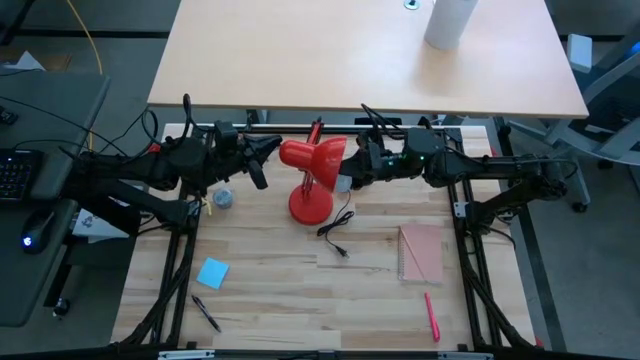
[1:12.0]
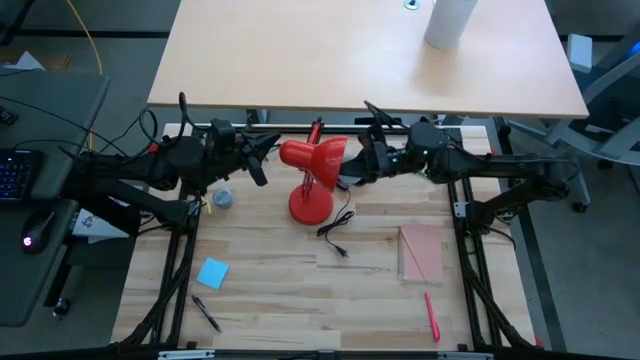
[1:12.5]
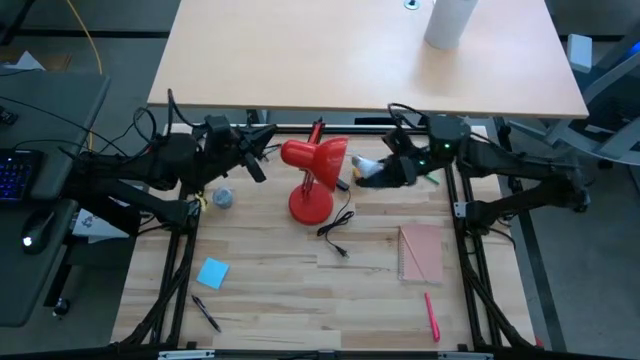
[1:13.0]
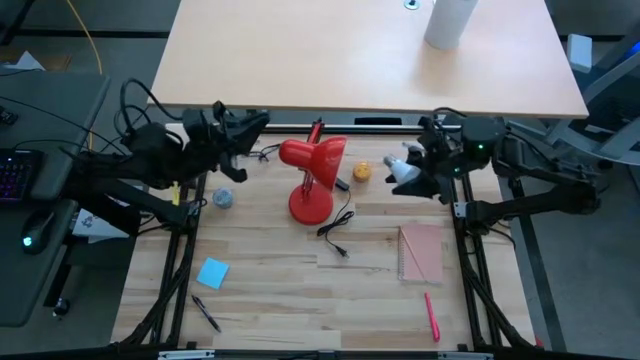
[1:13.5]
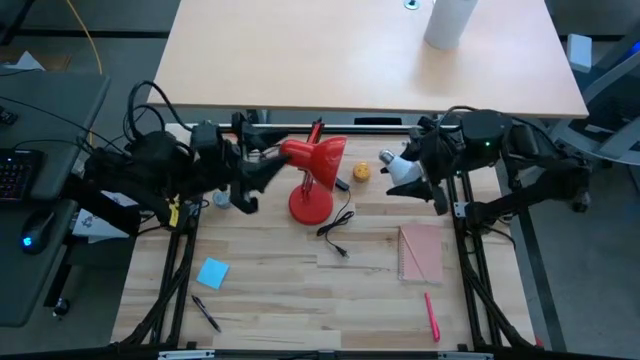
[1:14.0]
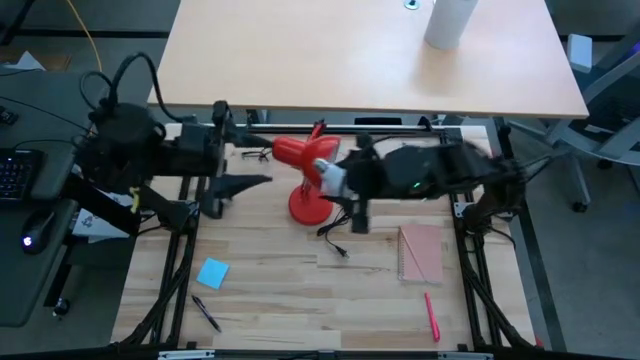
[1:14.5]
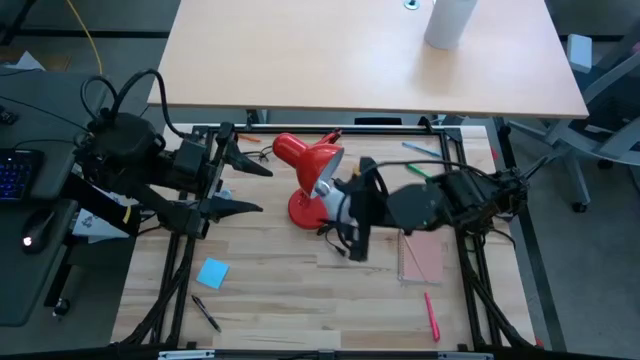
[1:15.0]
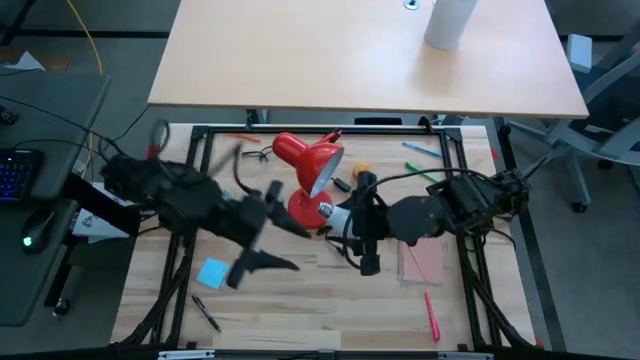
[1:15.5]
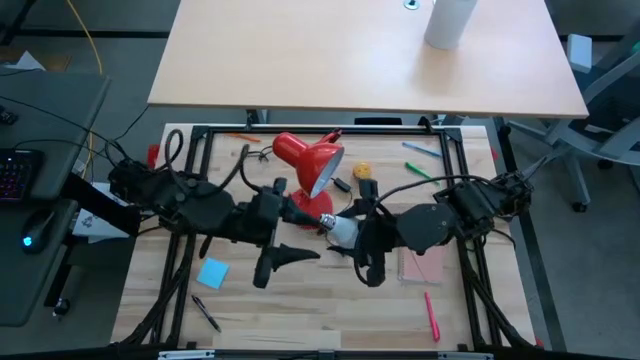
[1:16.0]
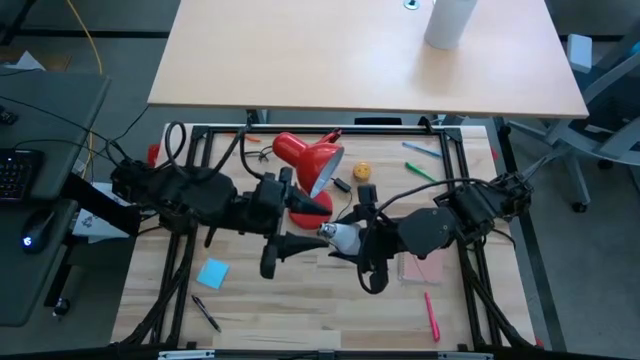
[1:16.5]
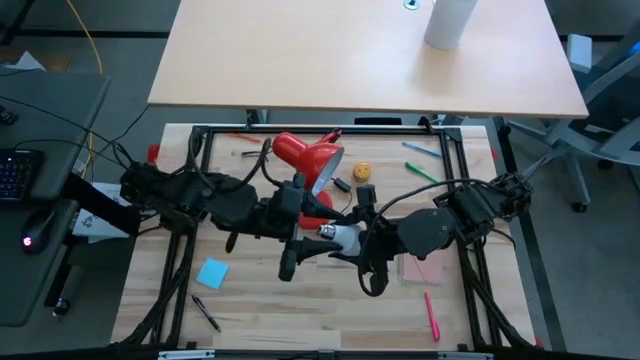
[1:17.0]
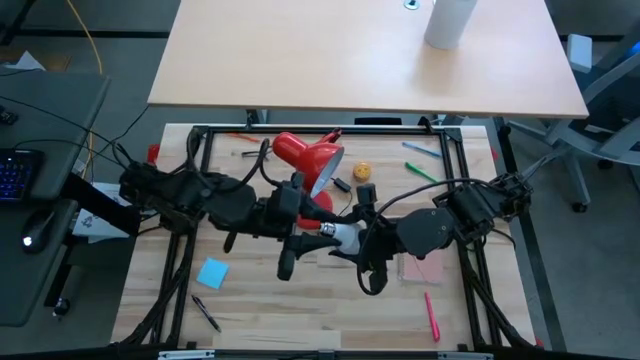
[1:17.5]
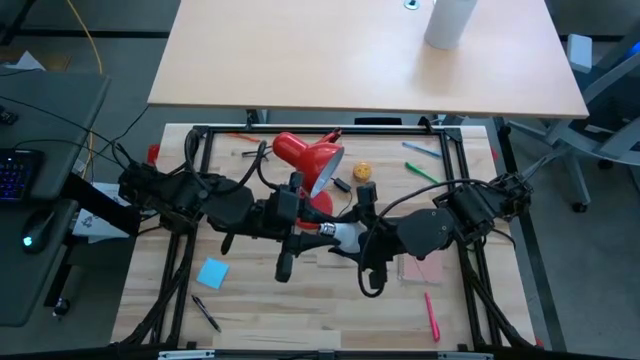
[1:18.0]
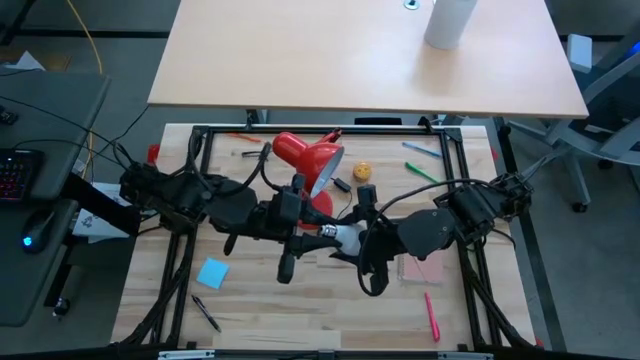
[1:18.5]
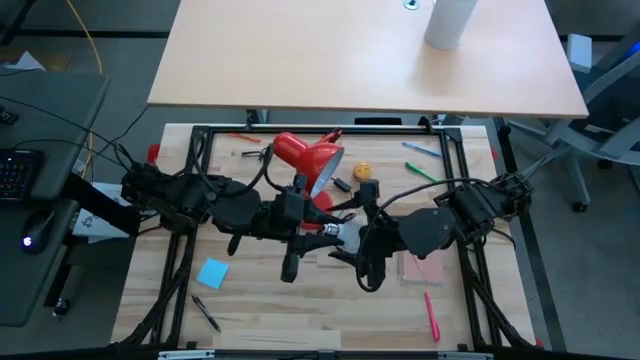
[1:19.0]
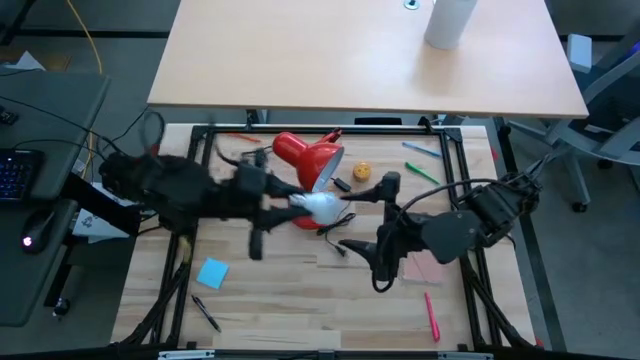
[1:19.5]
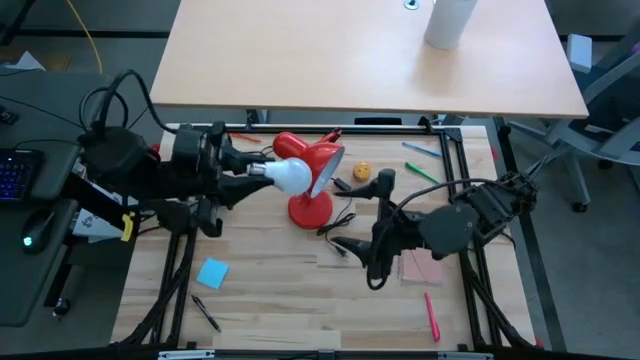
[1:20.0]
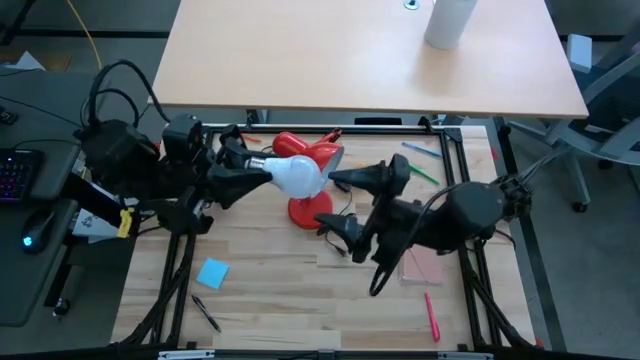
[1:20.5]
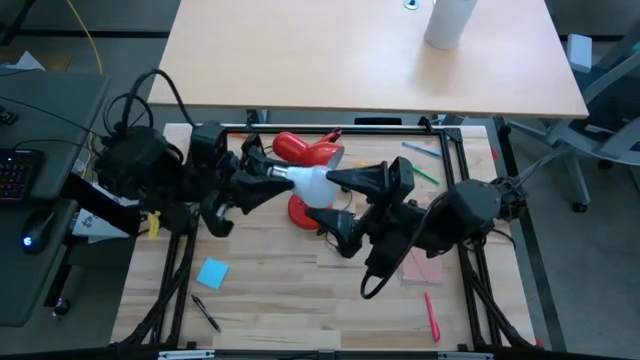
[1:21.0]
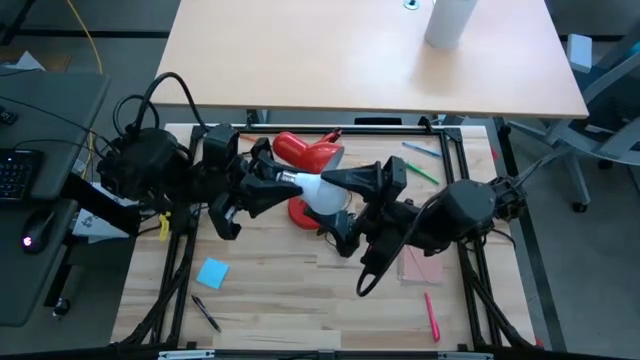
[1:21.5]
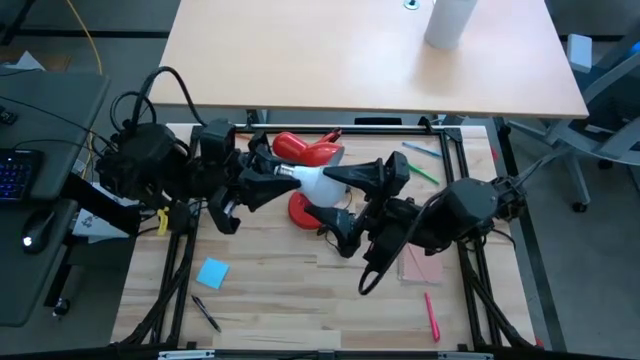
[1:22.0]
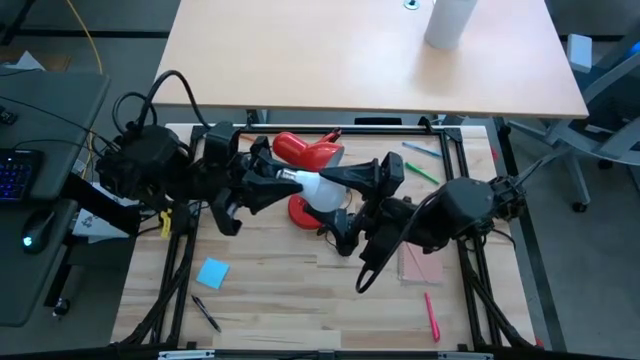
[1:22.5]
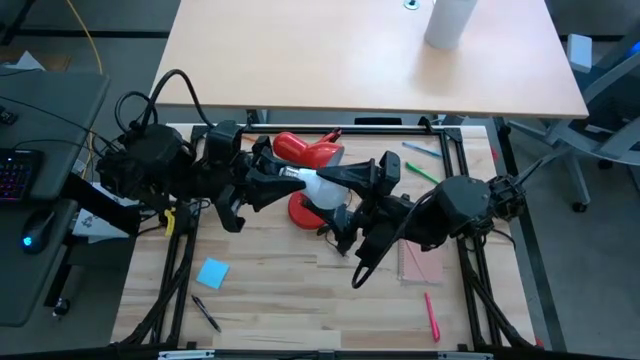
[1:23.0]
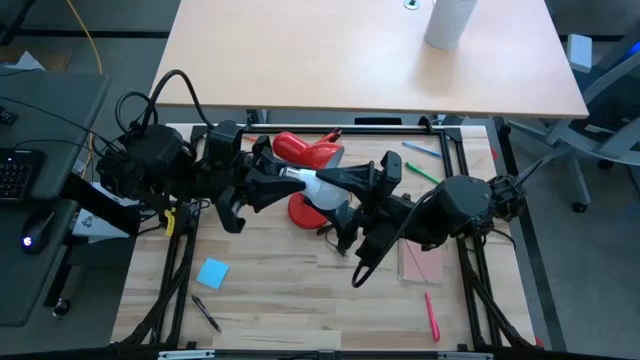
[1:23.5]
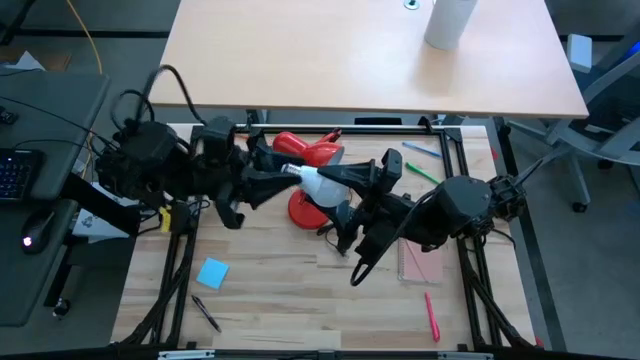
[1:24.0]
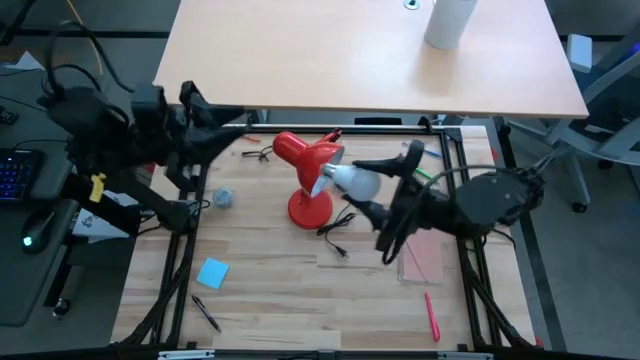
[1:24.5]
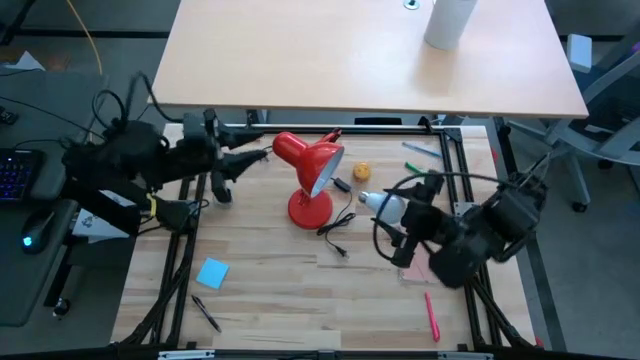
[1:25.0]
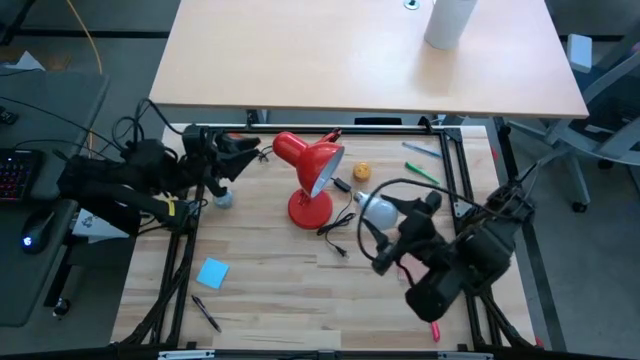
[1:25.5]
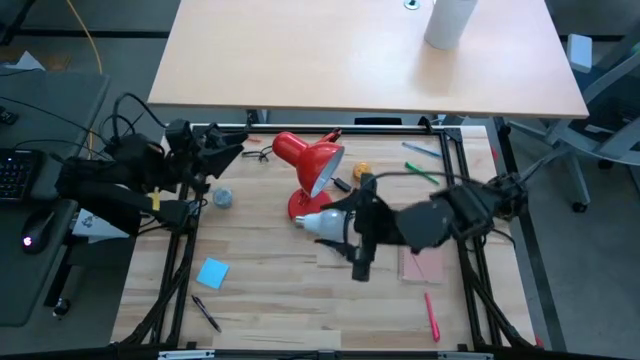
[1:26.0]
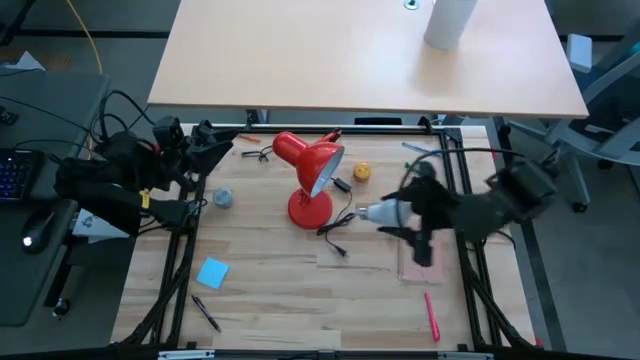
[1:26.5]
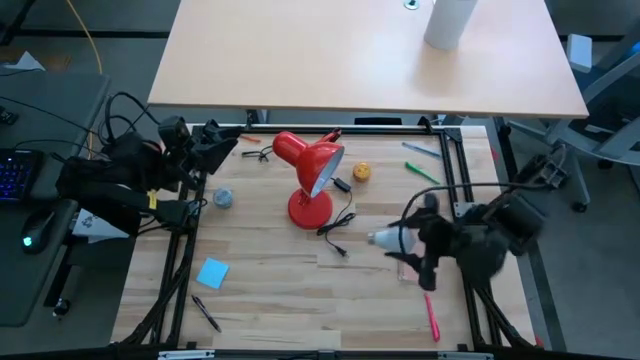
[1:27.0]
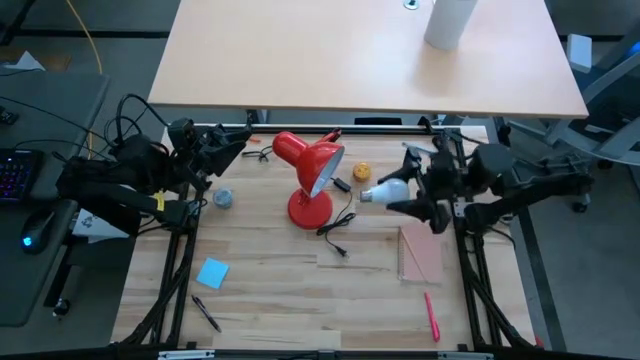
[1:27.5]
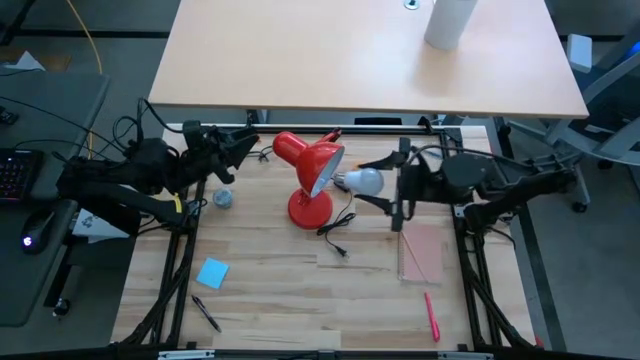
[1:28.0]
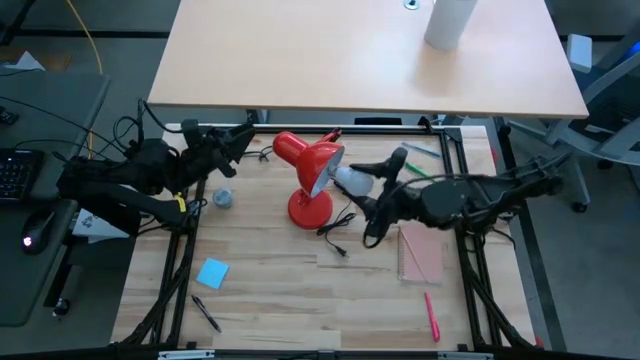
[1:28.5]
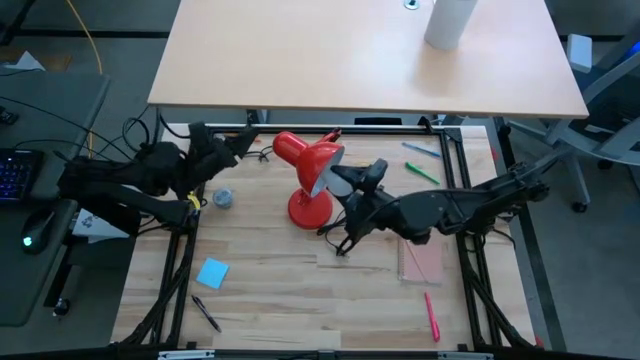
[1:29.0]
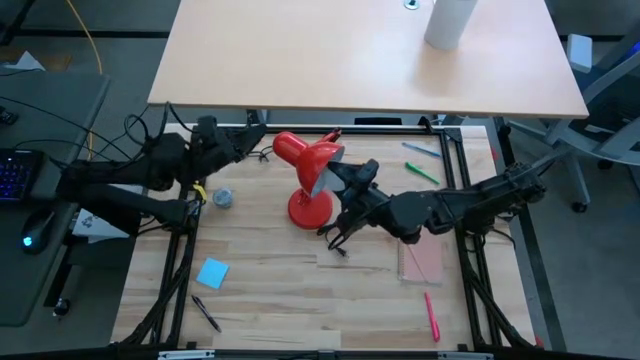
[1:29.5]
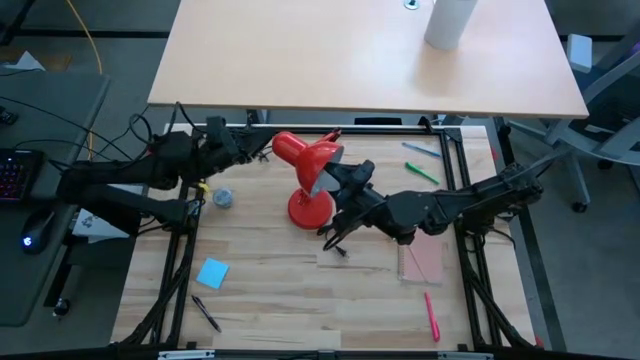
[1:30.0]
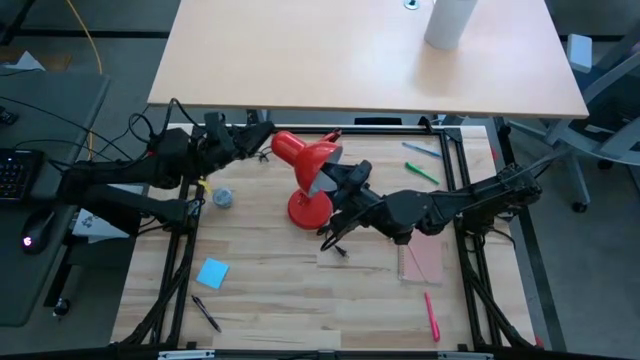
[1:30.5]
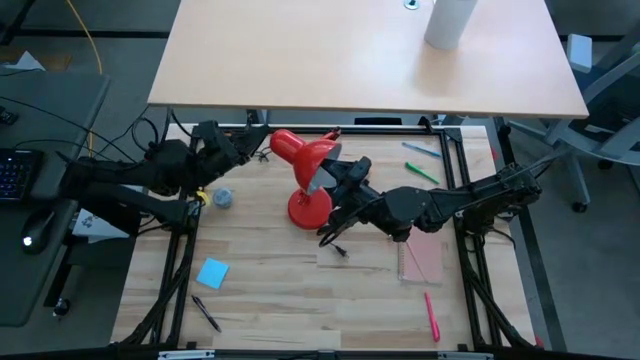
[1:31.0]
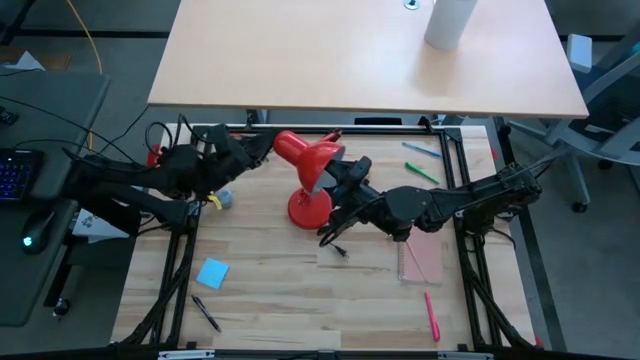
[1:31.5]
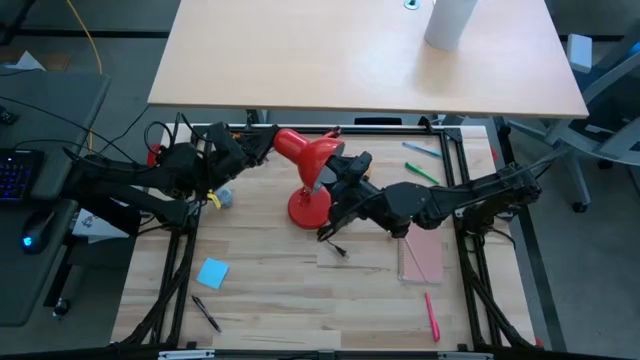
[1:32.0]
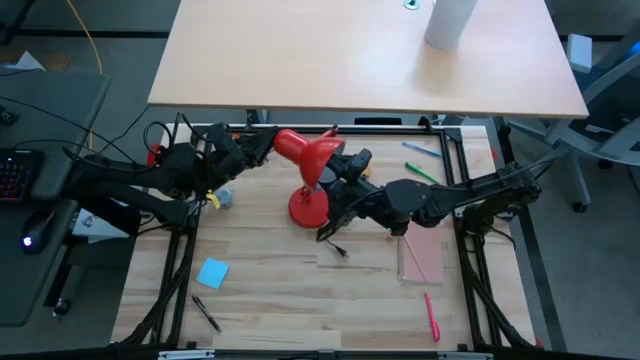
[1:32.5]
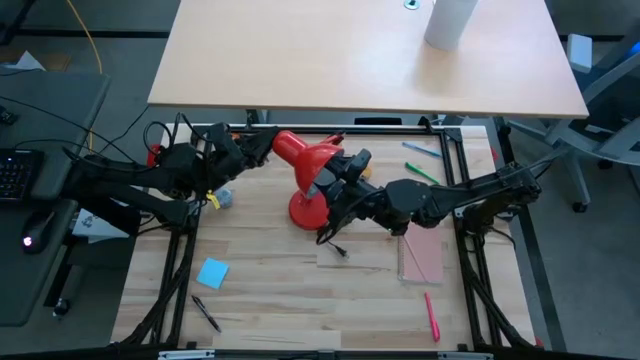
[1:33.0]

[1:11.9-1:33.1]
Task: Screw lightbulb
Insert the lightbulb into the lamp
